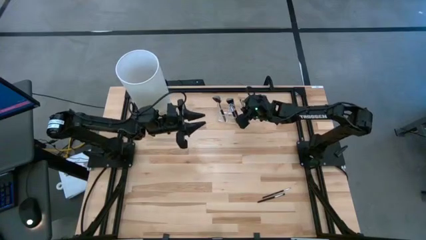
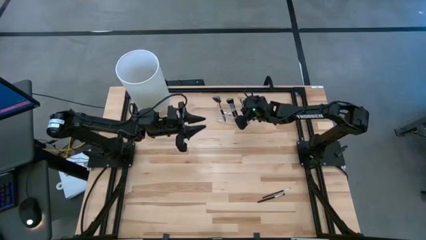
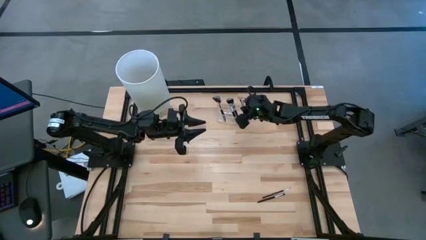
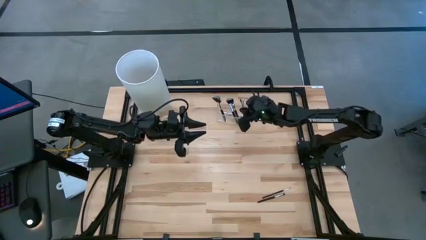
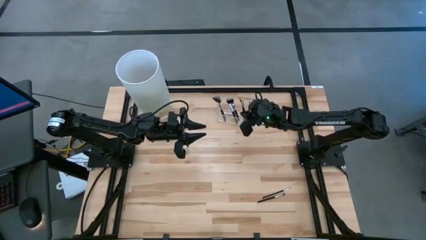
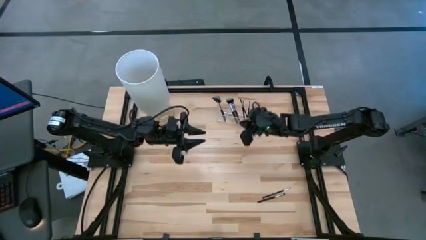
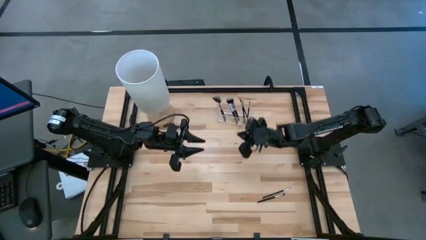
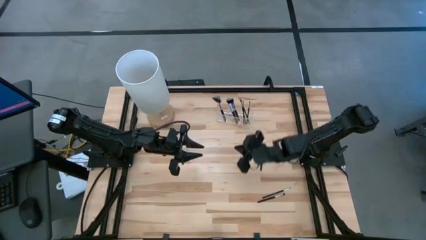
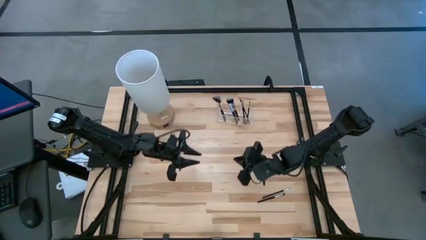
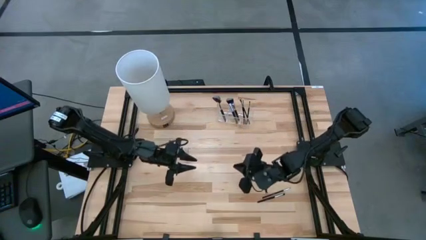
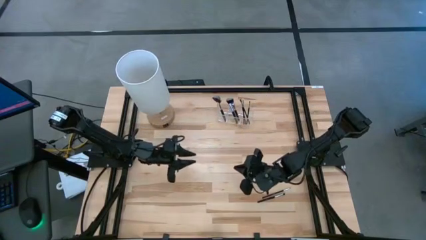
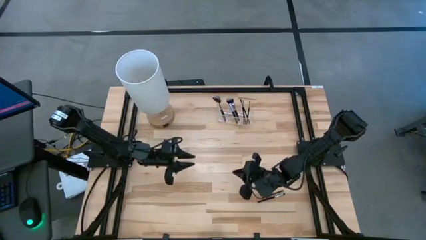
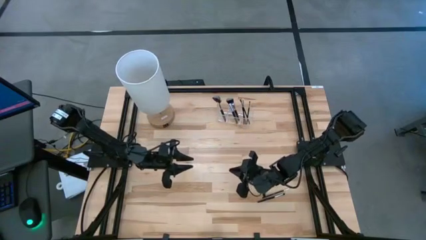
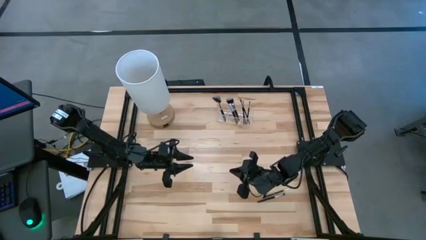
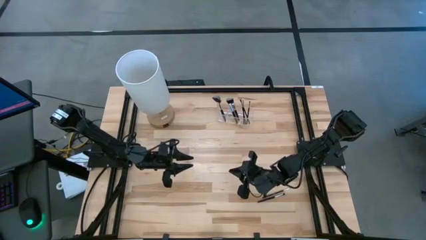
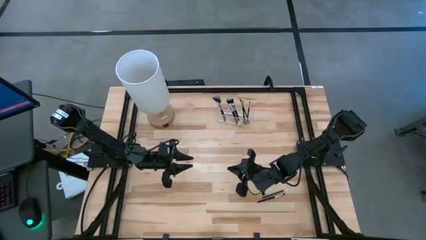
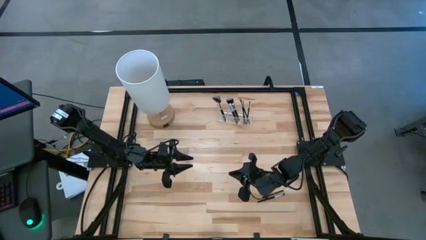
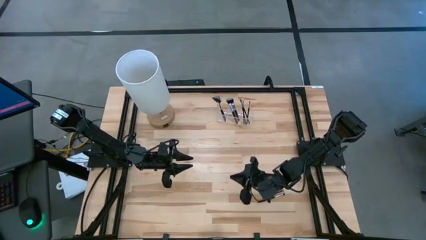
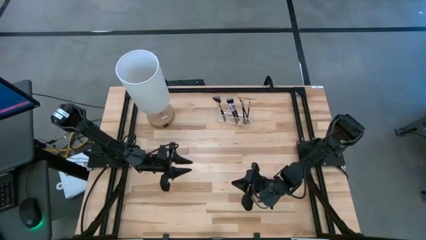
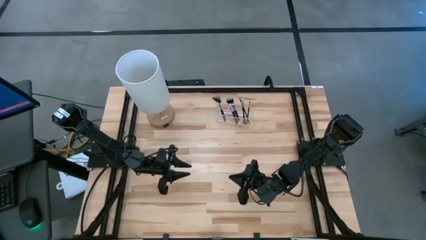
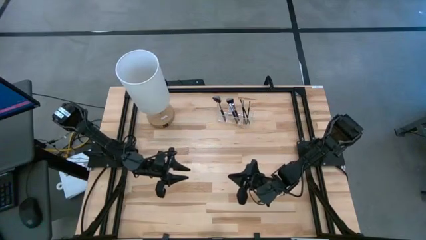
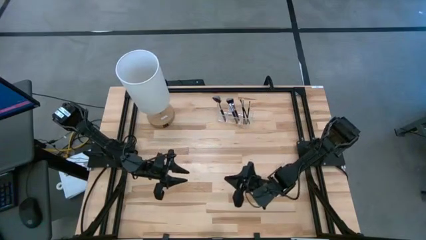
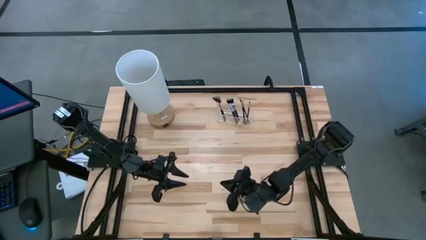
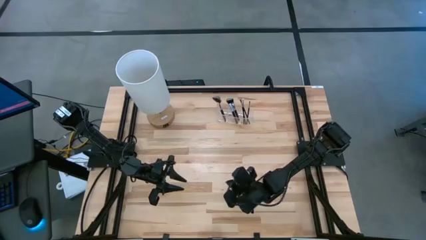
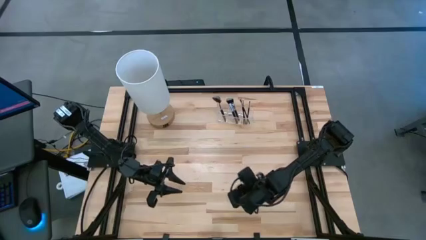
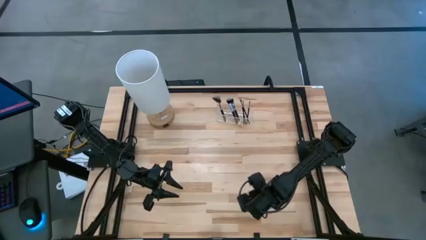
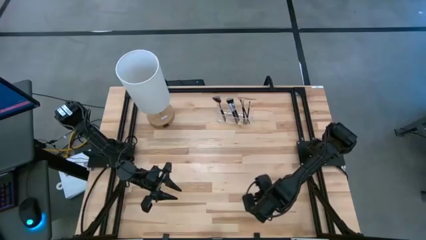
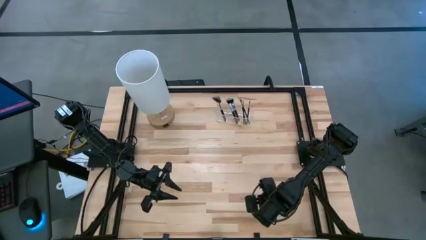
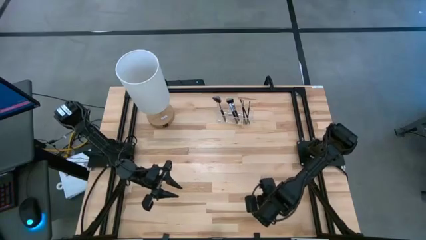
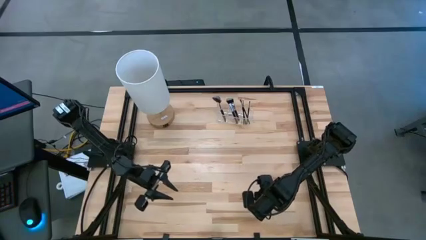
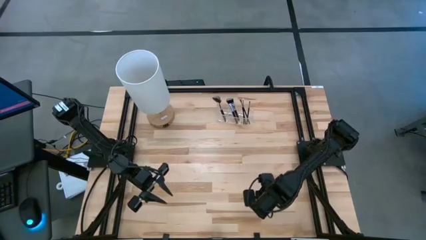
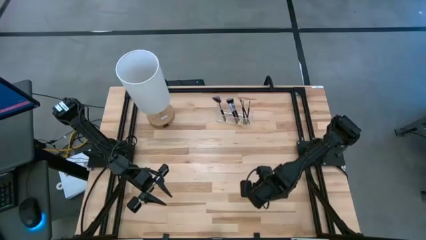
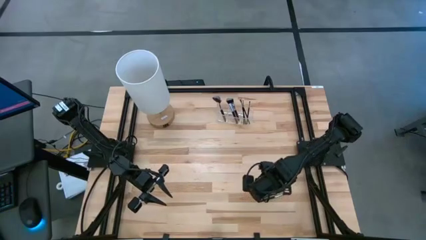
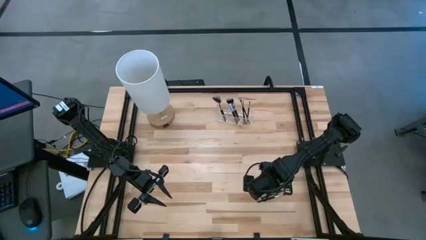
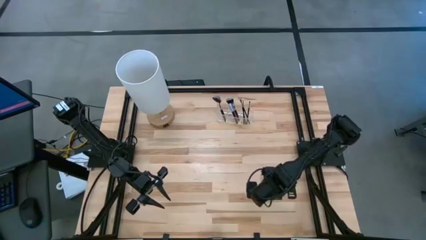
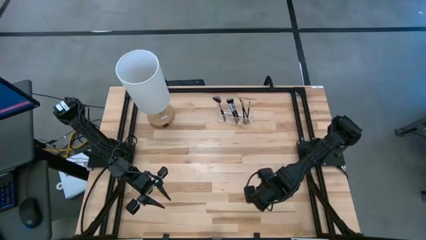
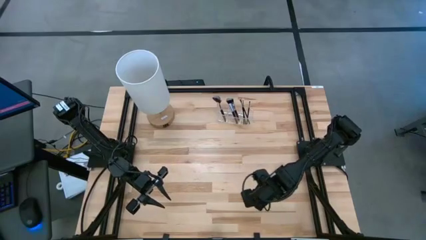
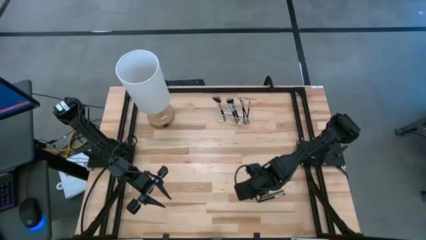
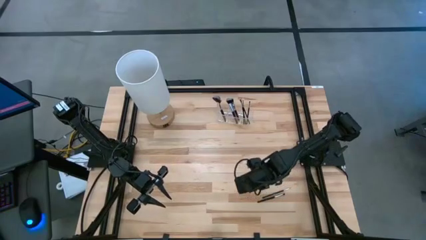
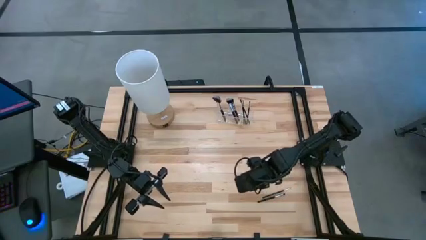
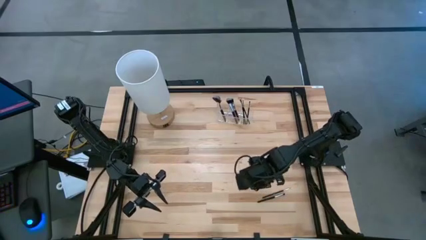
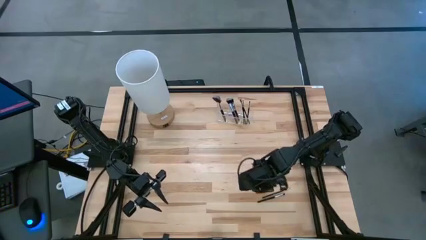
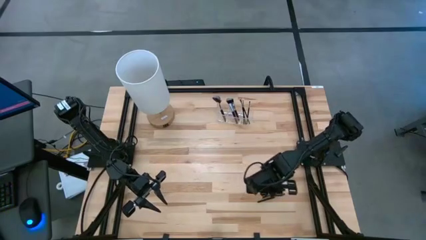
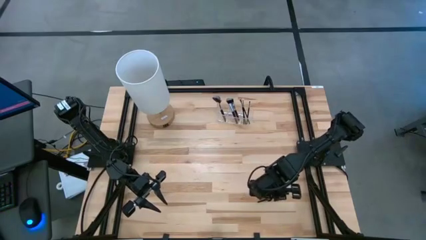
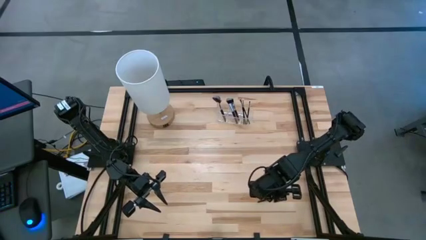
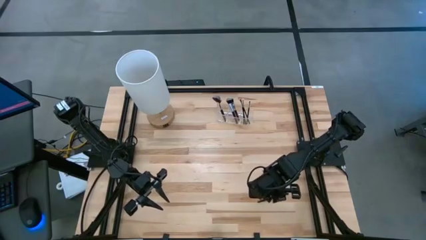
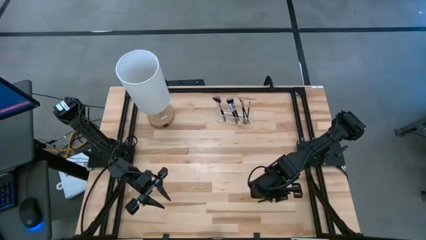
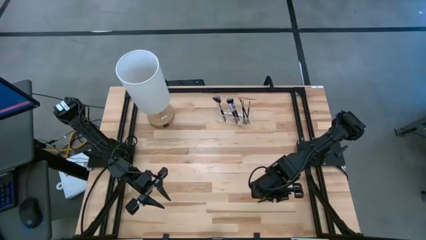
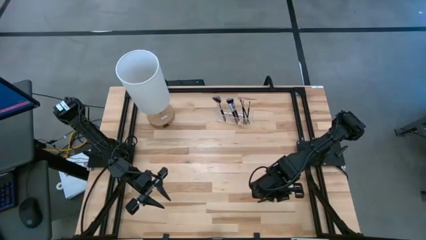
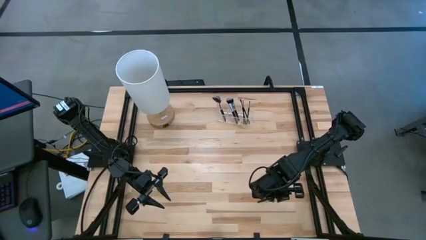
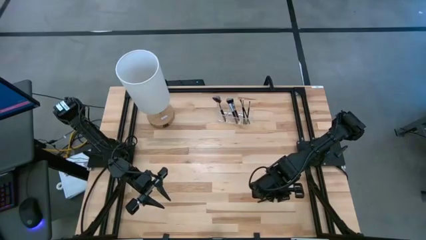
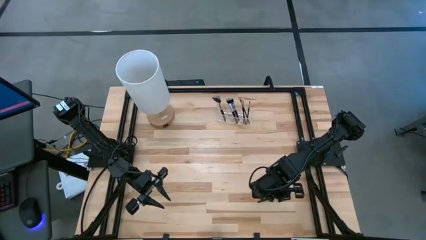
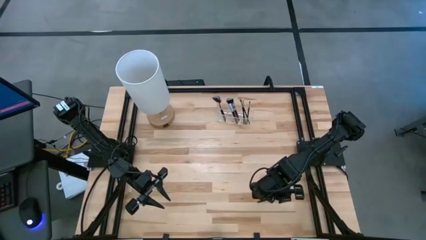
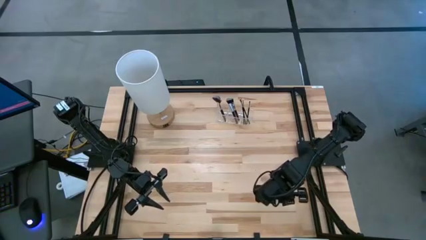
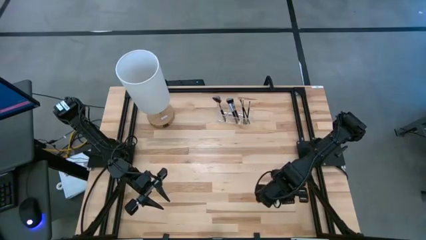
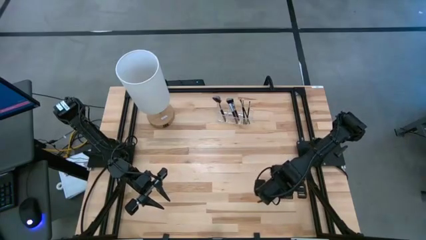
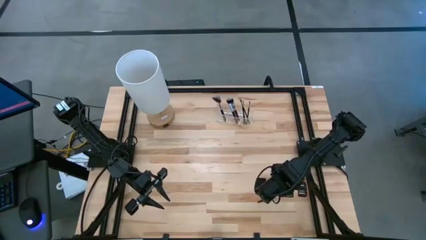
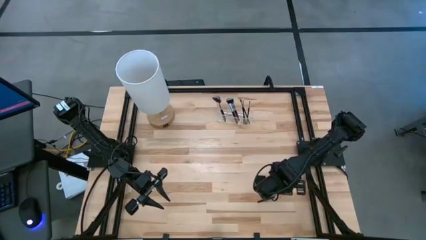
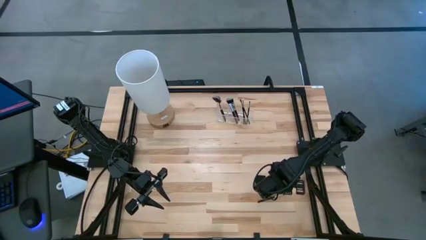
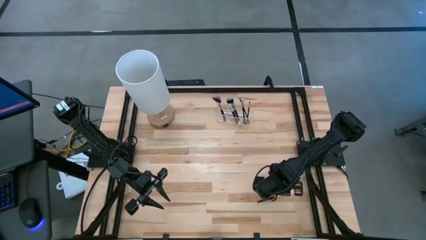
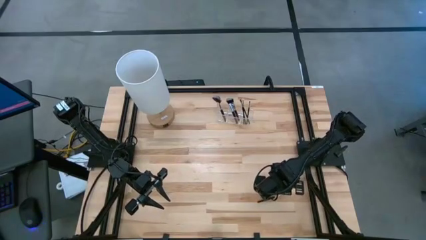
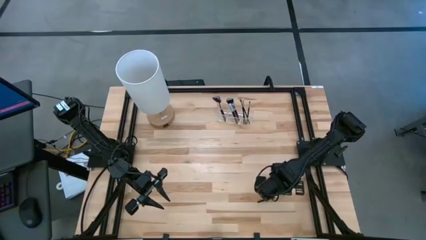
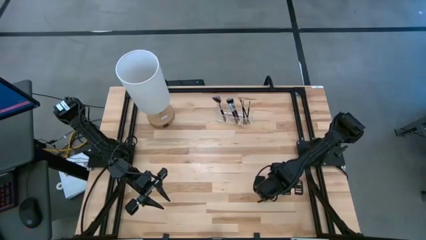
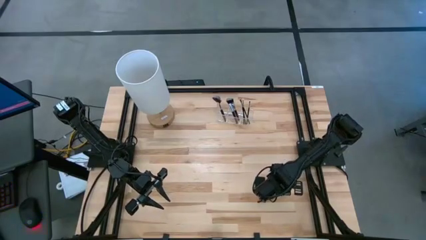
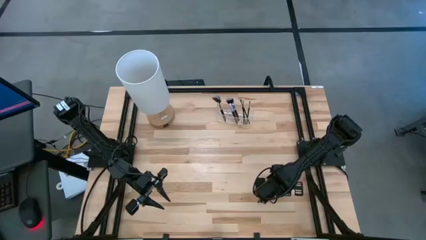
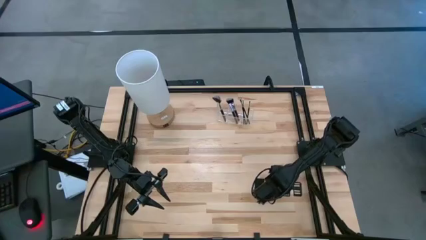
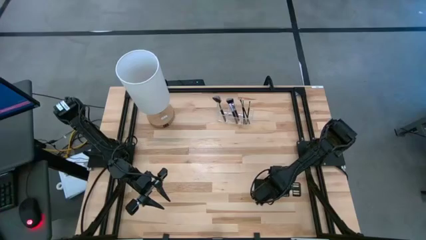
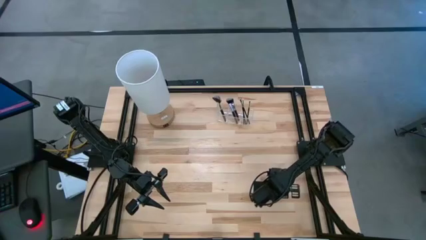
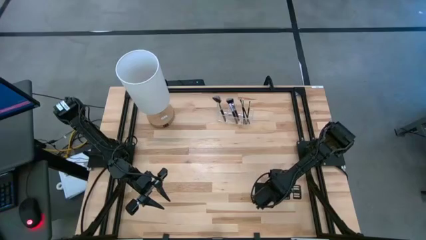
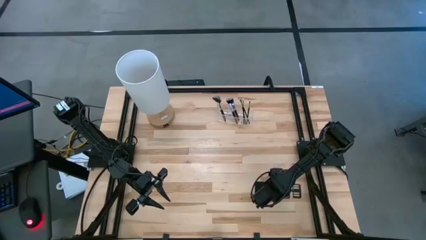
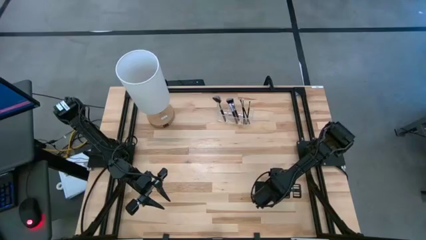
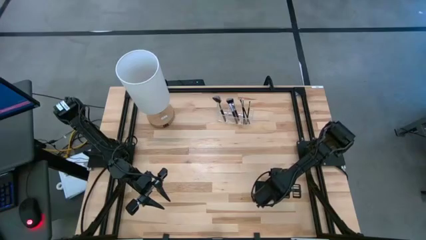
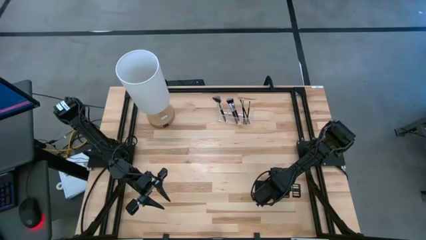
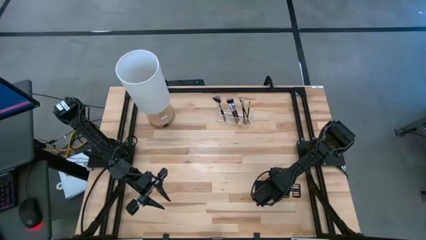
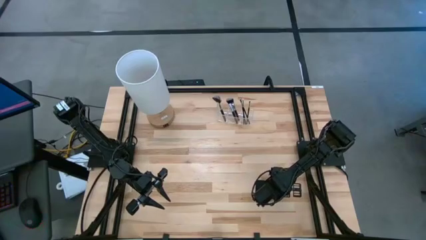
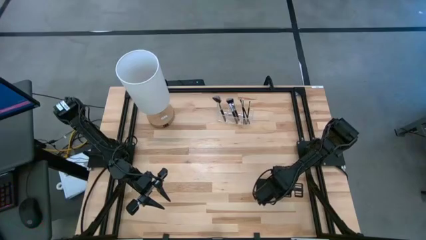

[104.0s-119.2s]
Task: Put items in baskets/containers
Put the black liner brush into the transparent organizer
